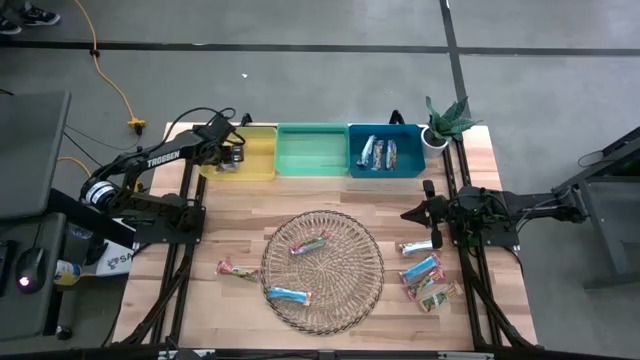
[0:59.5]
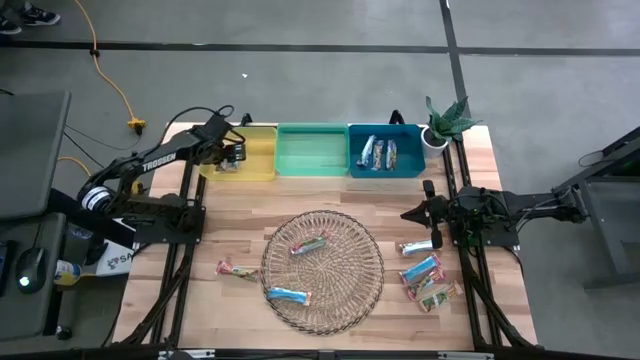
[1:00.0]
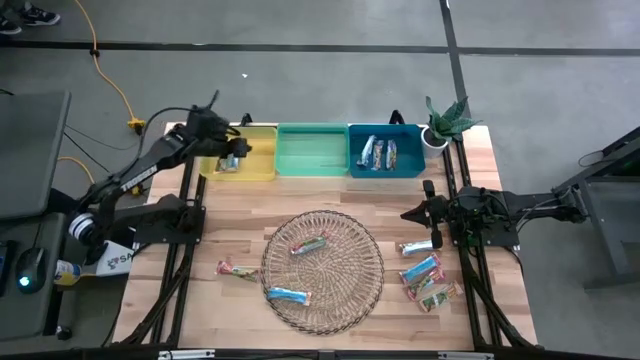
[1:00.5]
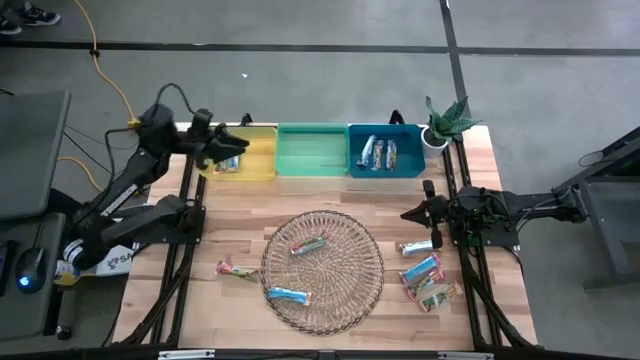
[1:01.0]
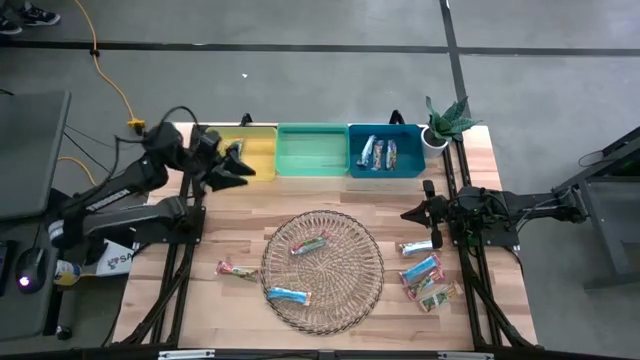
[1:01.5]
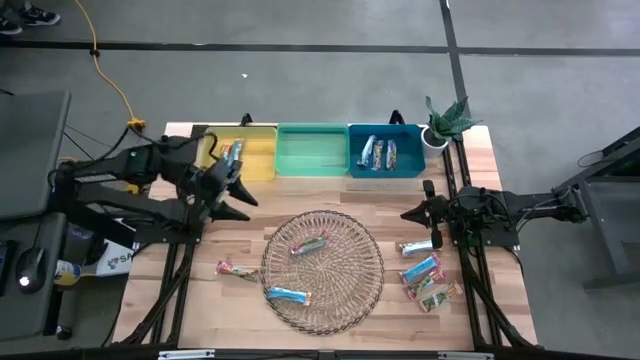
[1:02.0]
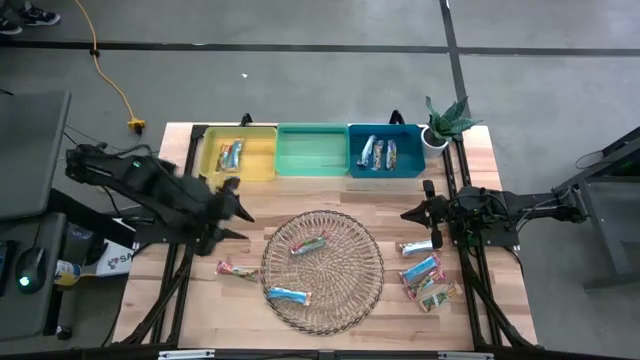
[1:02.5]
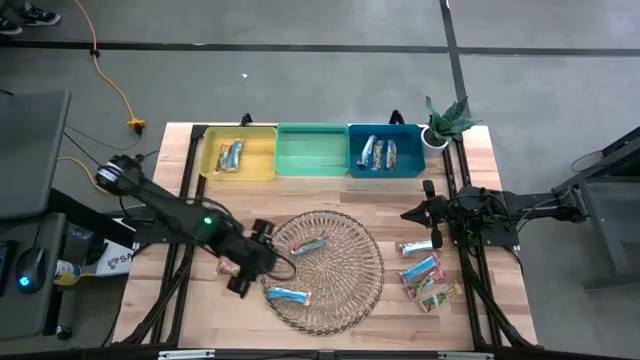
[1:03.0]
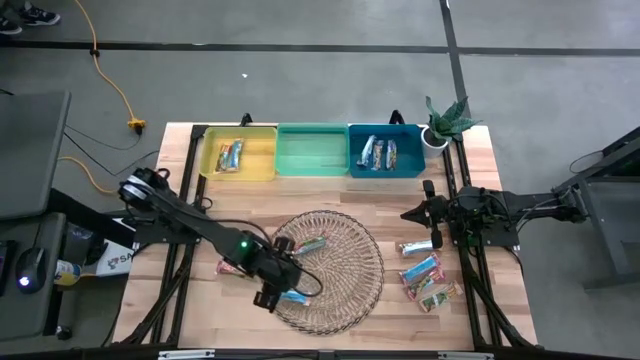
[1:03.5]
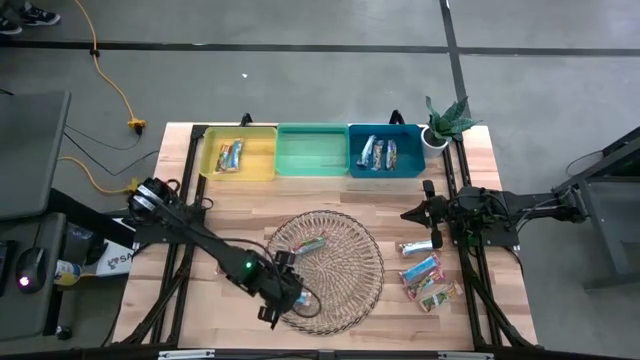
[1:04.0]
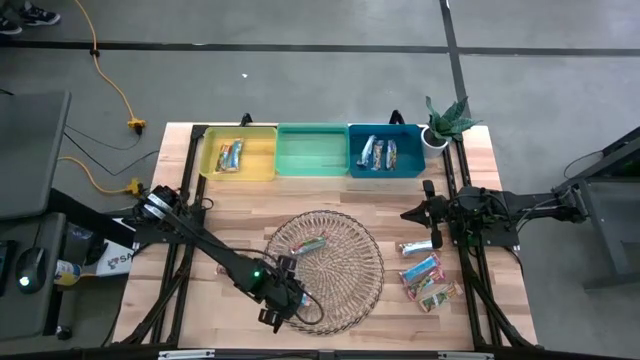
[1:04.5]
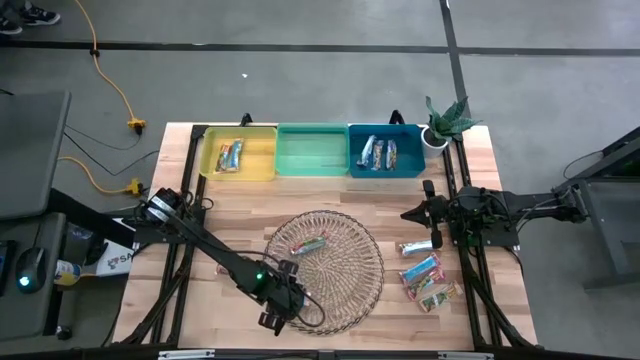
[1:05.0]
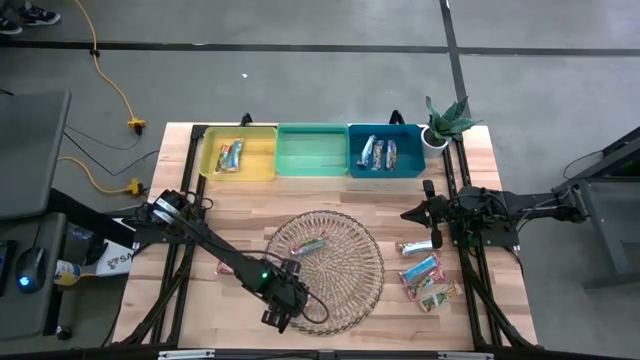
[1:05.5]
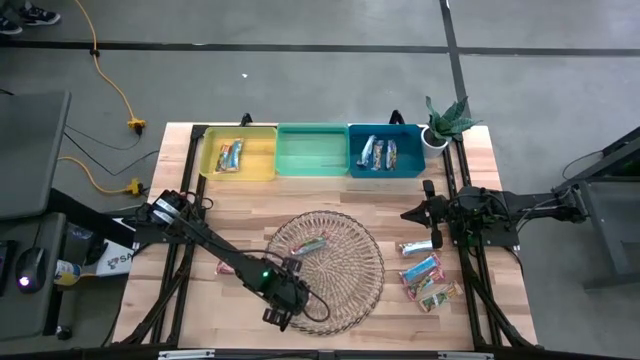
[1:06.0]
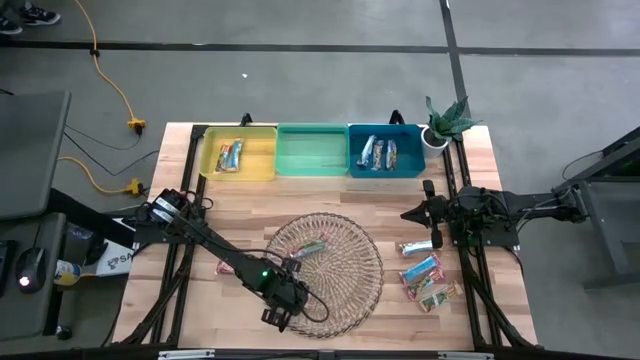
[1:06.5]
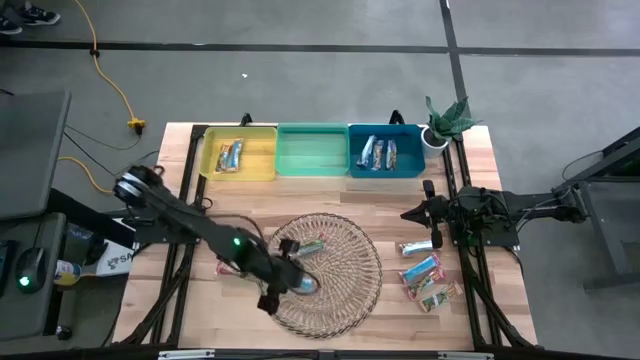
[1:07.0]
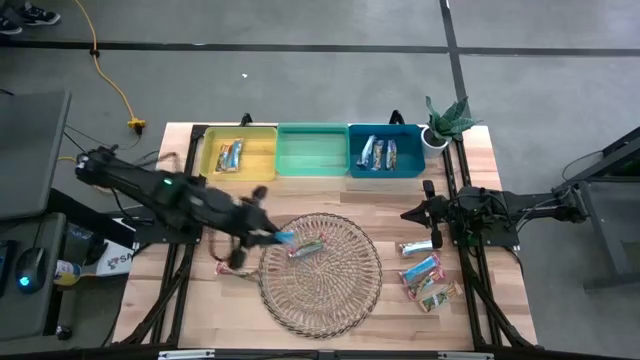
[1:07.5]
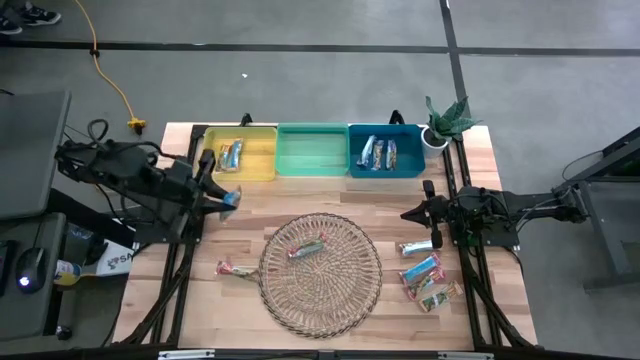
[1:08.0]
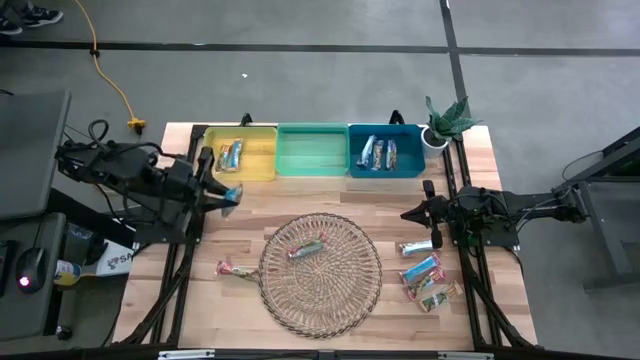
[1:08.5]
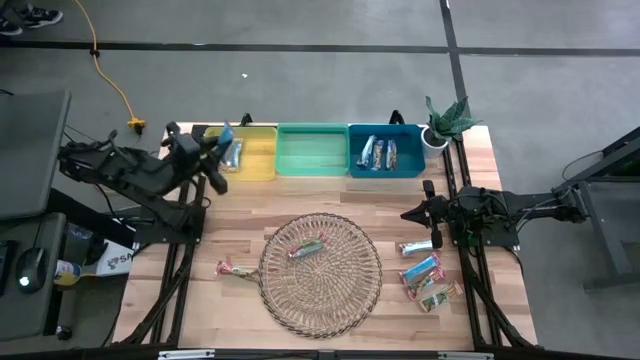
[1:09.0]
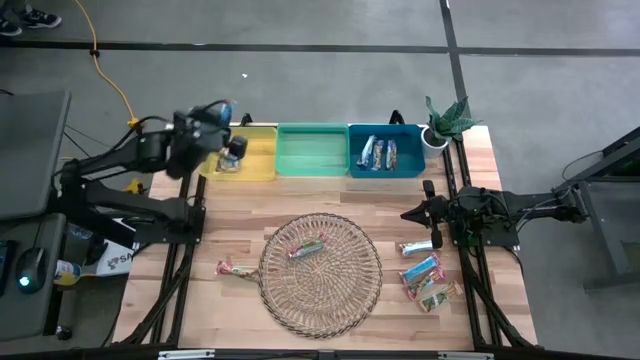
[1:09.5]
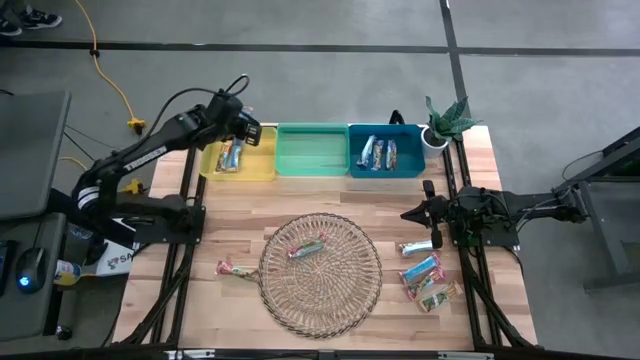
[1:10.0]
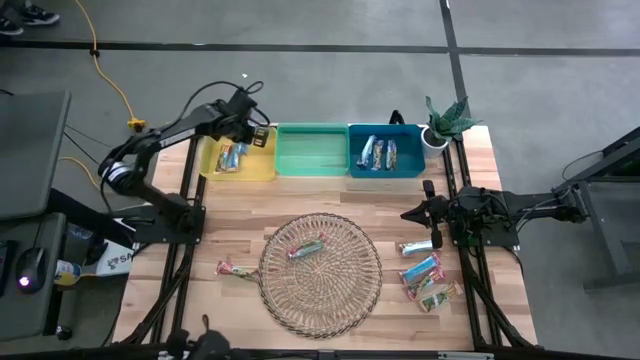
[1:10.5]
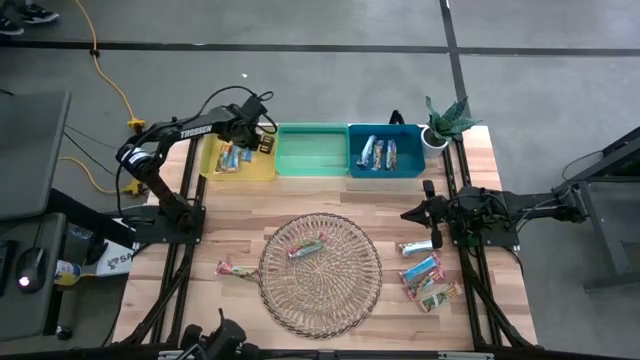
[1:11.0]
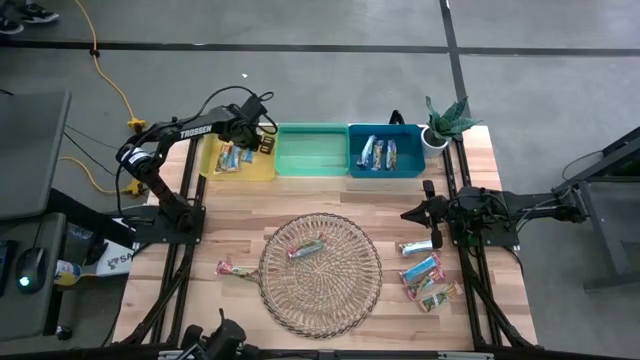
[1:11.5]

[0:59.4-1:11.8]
Task: Pick and place Granola Bars by type
Put the yellow granola bar into the yellow bin

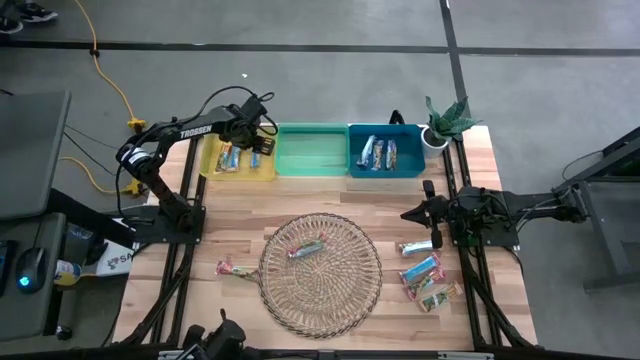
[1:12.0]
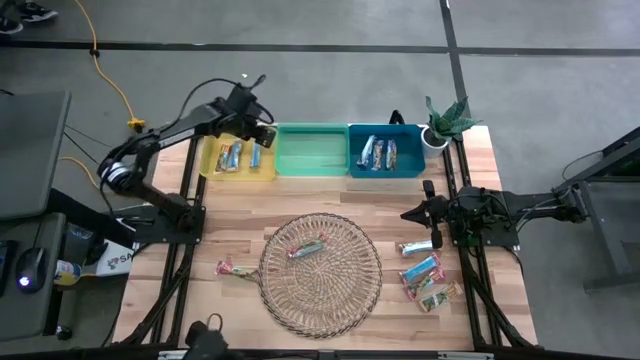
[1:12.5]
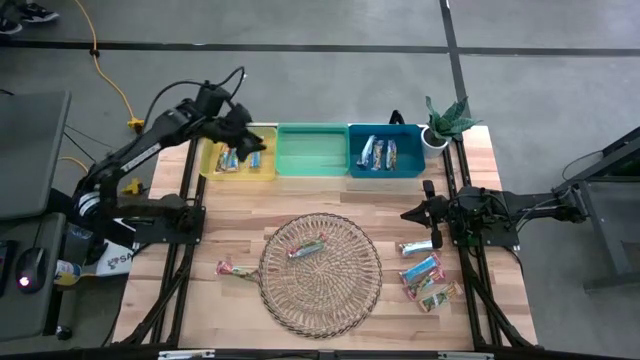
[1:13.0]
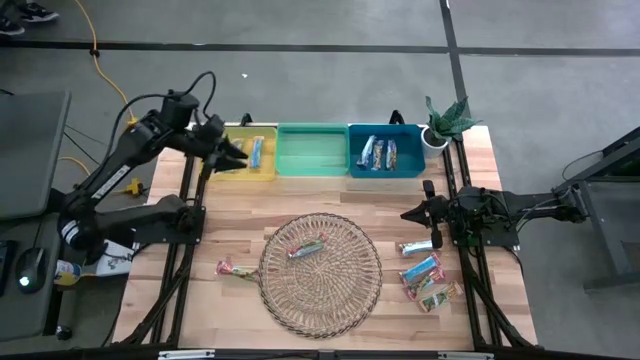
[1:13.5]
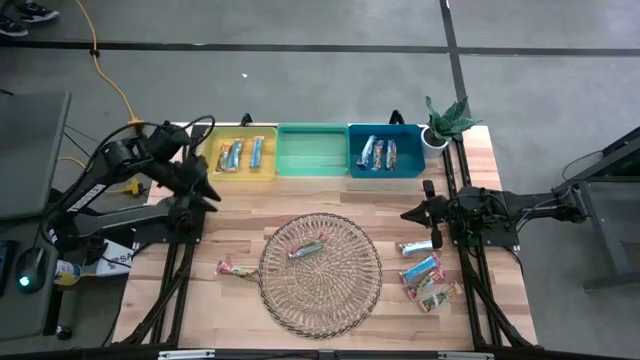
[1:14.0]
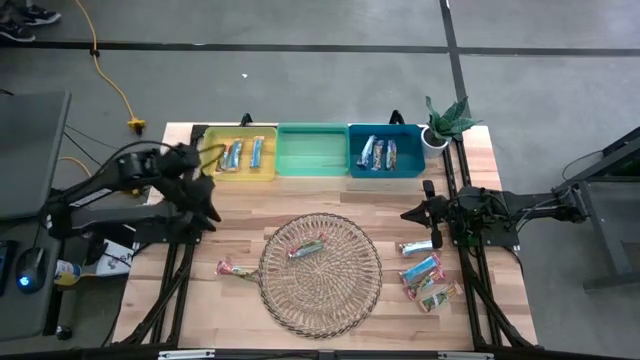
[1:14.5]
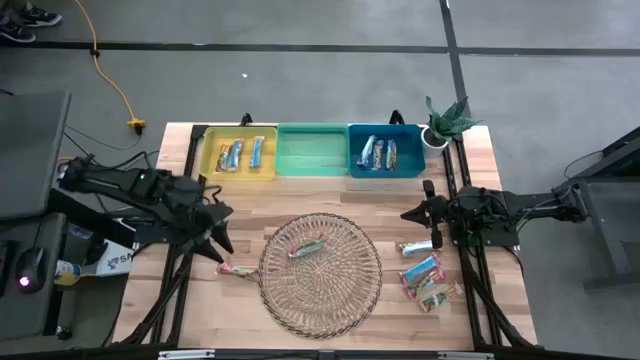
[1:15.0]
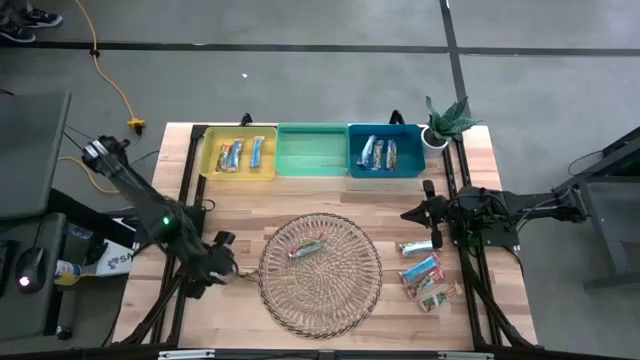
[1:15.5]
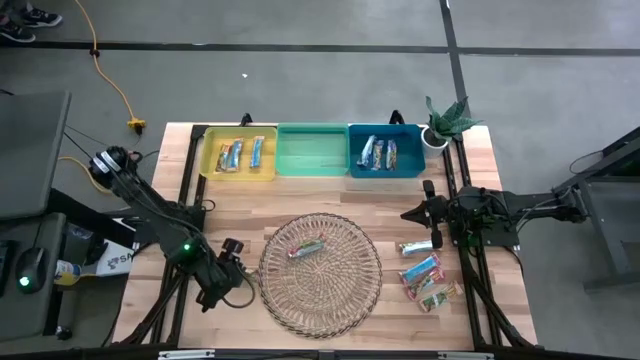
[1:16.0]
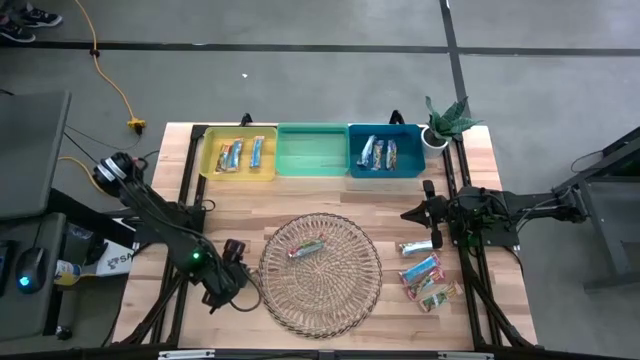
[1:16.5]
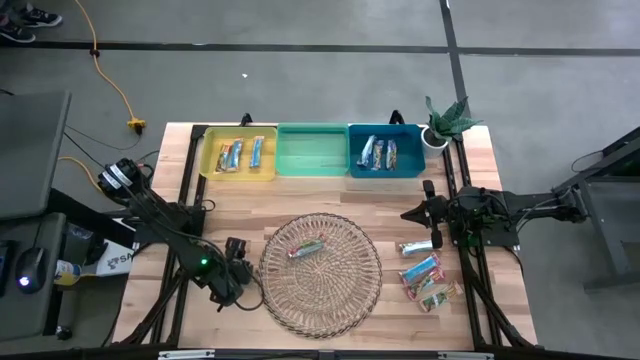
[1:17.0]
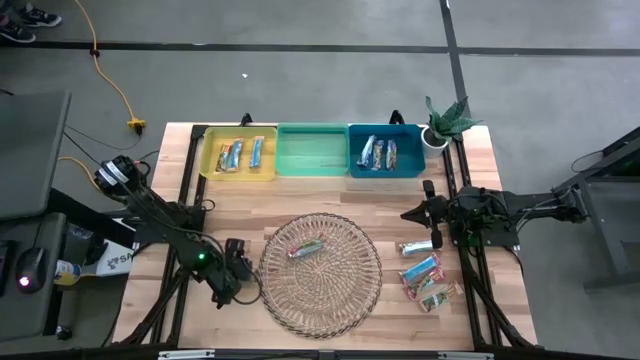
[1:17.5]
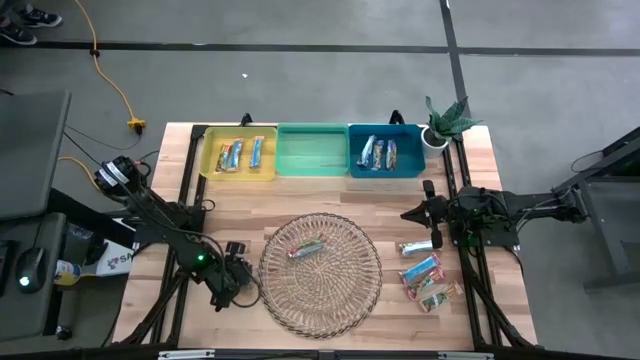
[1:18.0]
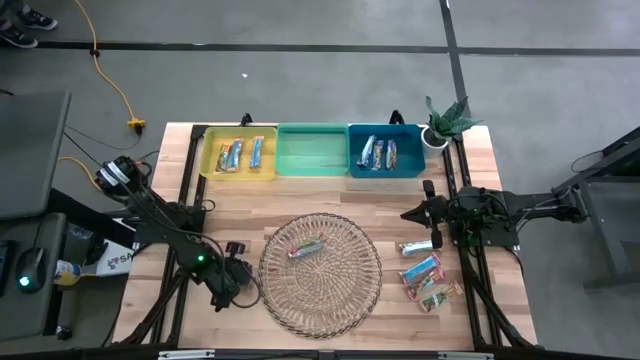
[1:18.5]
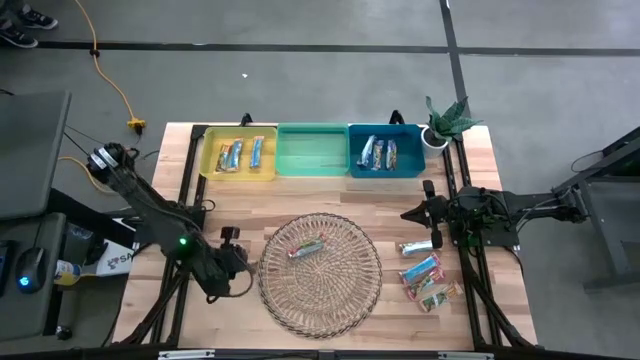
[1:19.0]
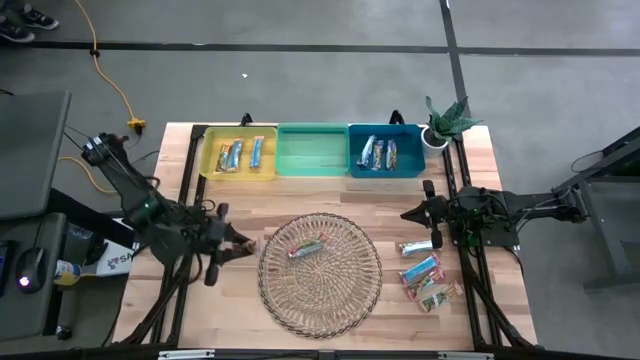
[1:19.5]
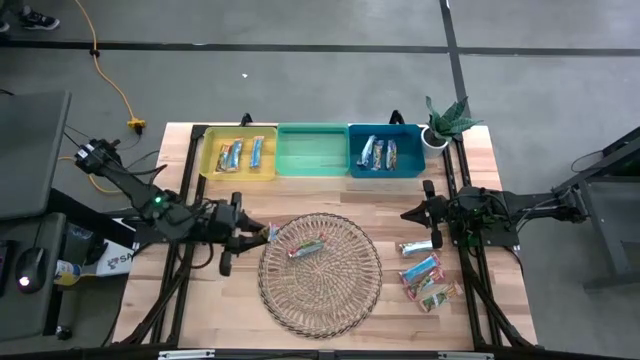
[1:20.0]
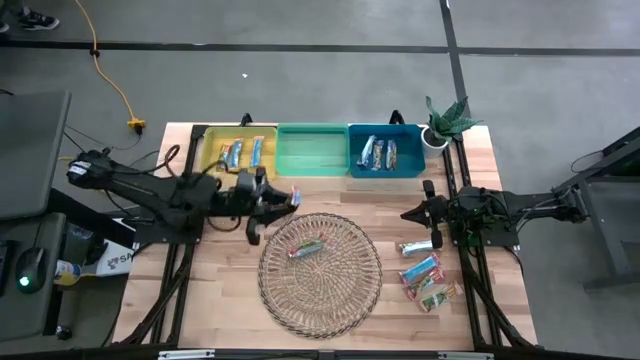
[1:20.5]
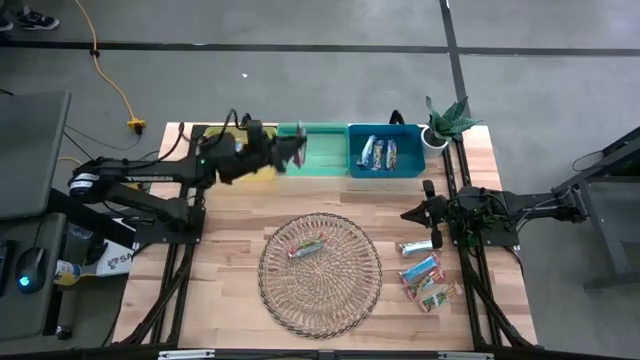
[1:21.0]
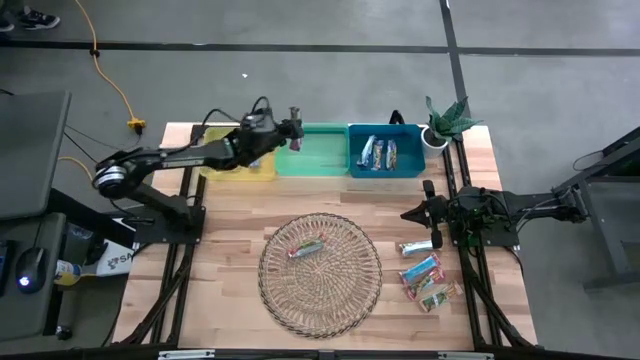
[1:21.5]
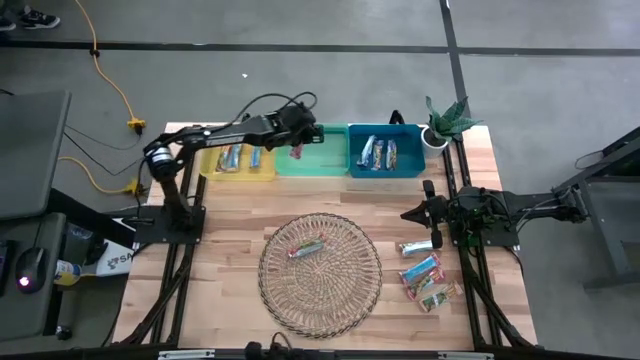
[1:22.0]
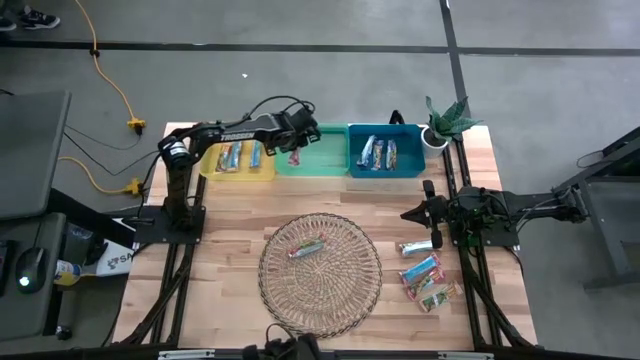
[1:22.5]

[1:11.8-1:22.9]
Put the red granola bar into the green bin
